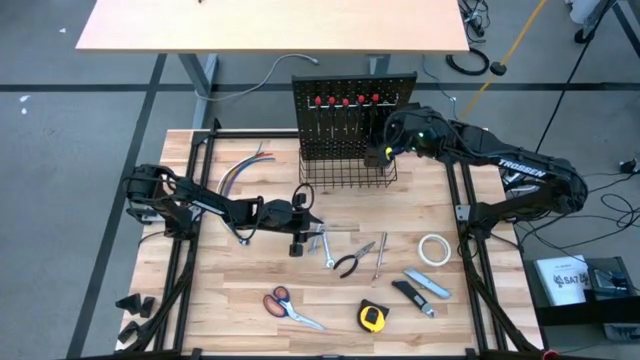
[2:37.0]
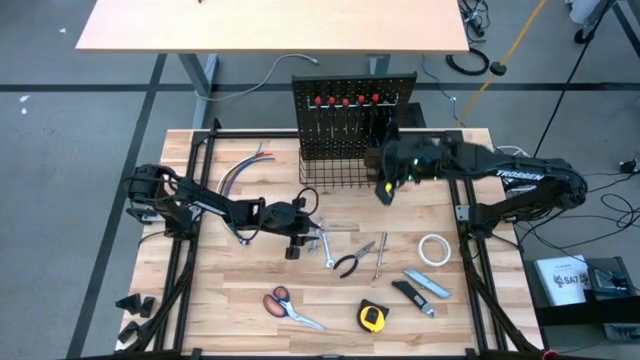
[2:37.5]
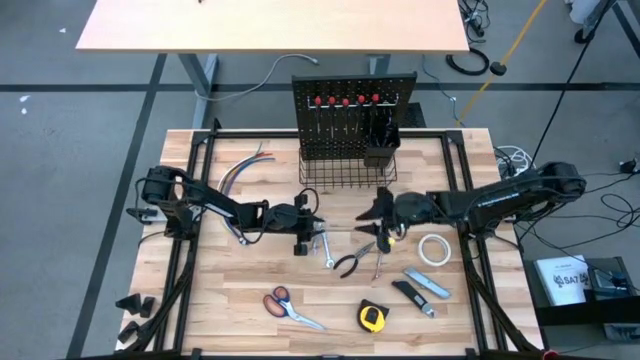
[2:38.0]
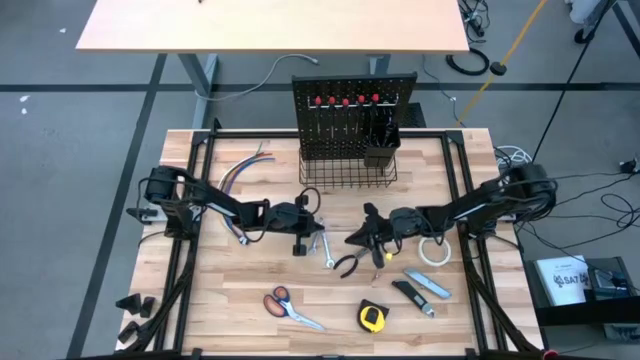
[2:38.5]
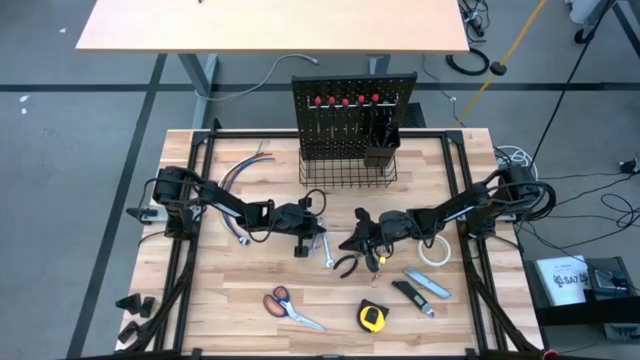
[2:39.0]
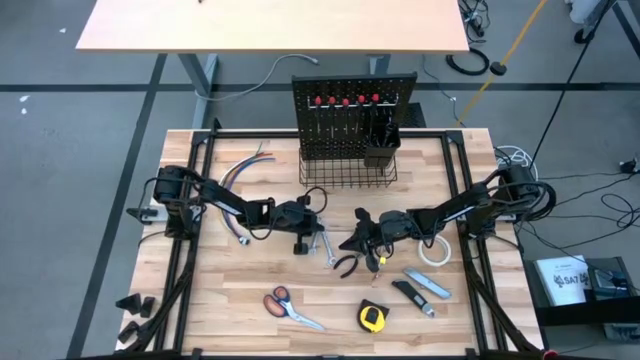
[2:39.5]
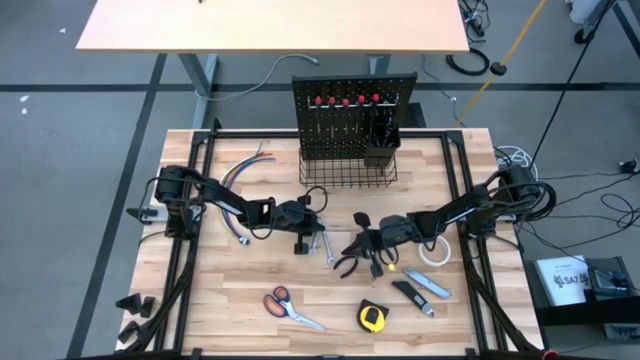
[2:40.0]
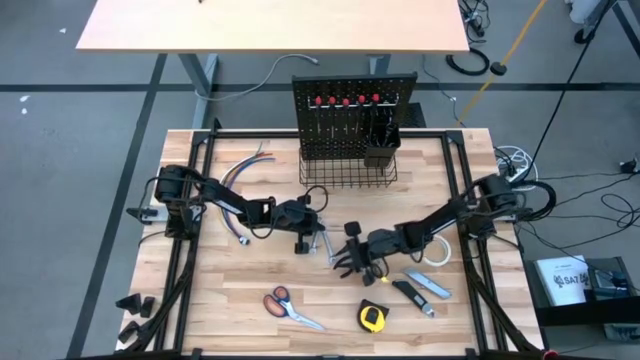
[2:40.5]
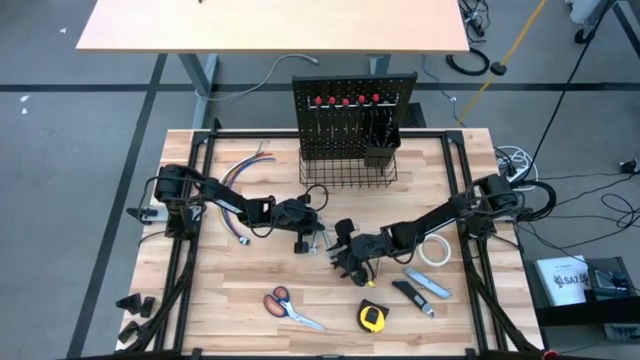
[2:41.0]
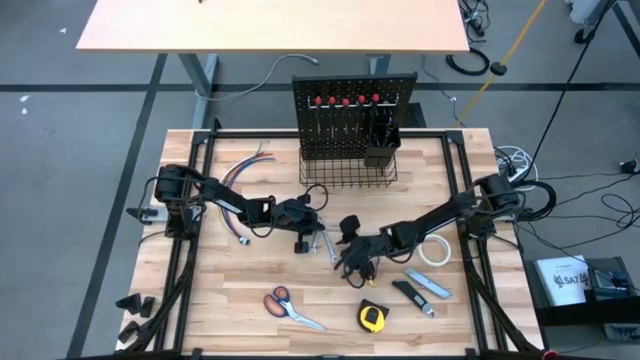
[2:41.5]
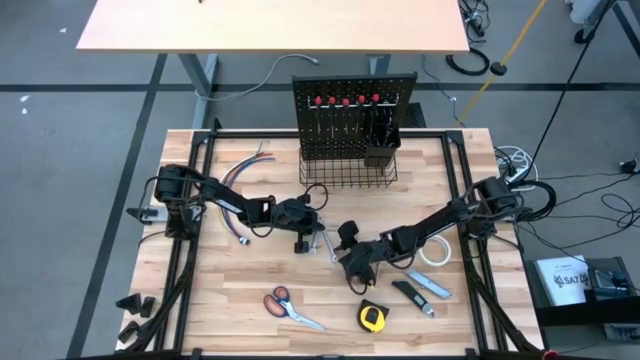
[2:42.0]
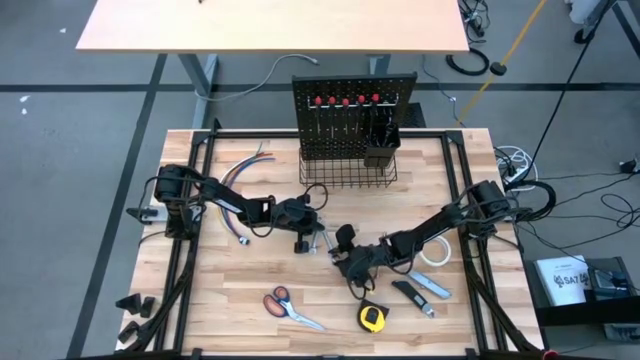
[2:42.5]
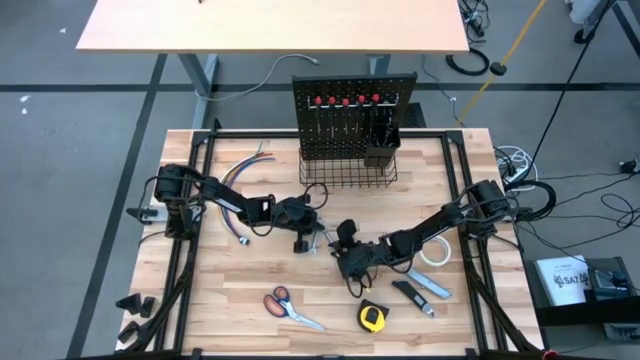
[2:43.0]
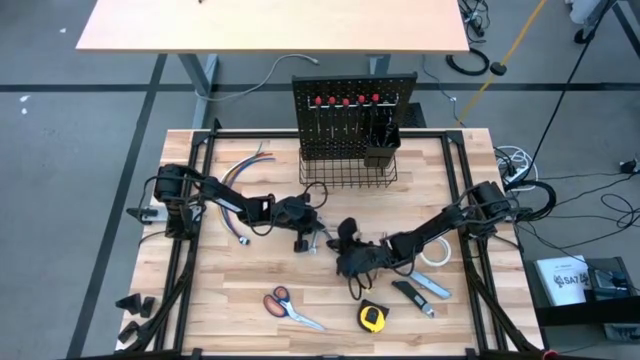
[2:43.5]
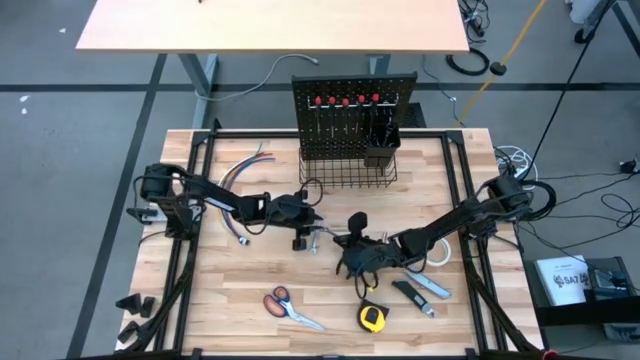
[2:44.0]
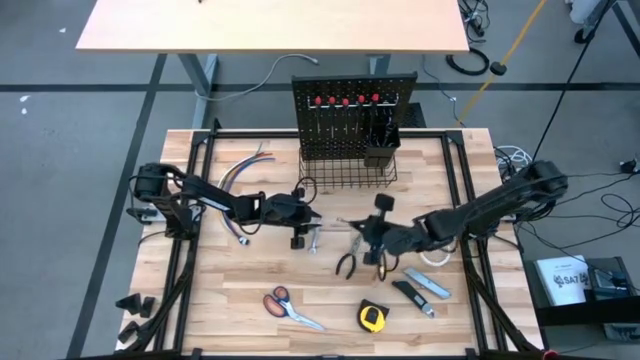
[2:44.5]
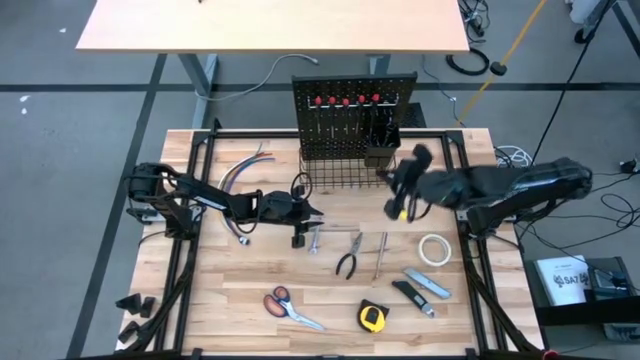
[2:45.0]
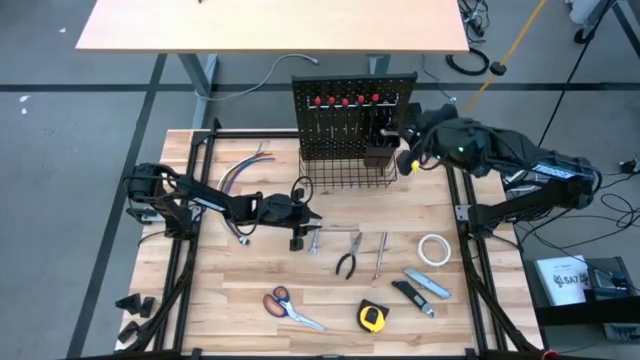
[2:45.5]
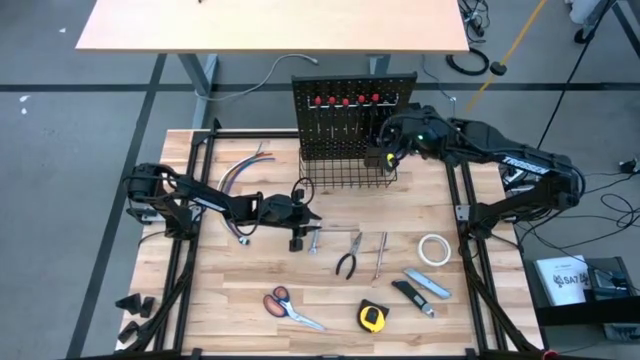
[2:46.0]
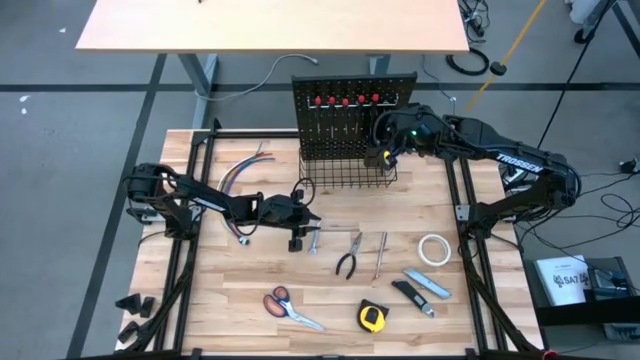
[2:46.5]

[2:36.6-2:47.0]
Task: Hang tools onto peg board
Put the wrench into the black bin on the pegboard

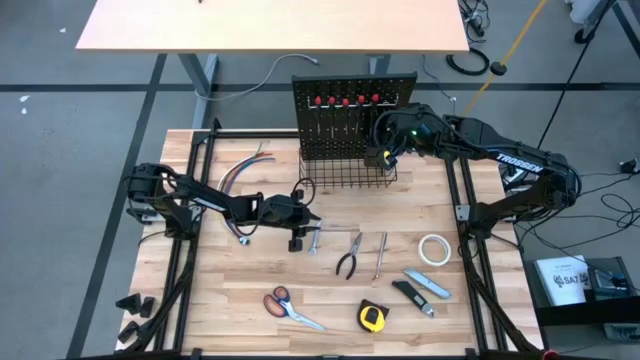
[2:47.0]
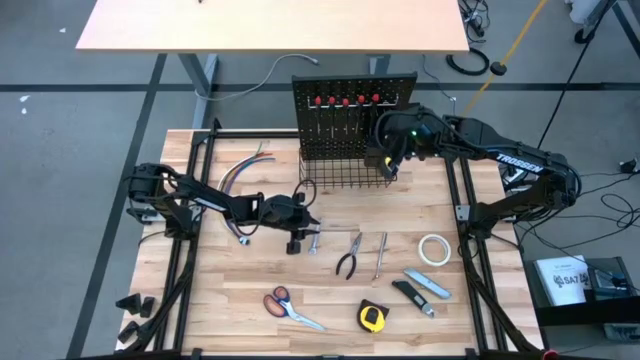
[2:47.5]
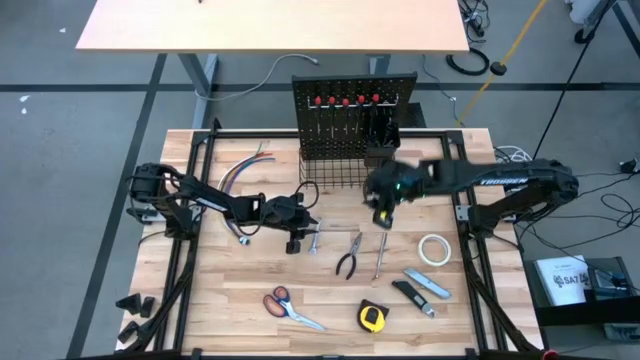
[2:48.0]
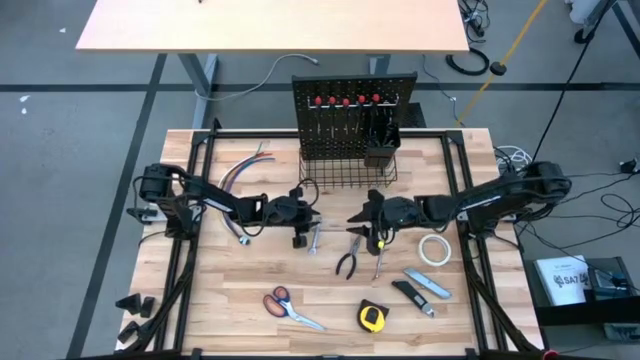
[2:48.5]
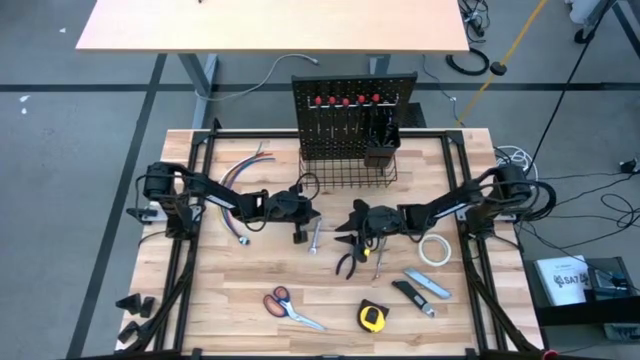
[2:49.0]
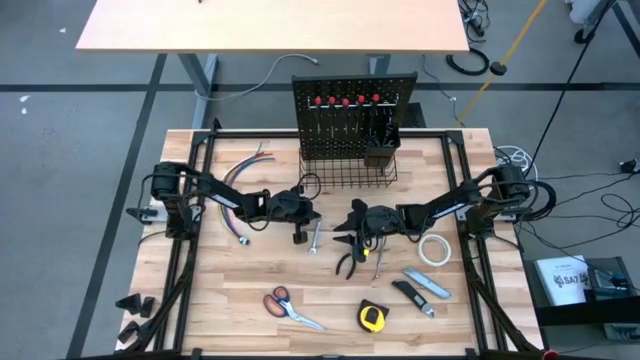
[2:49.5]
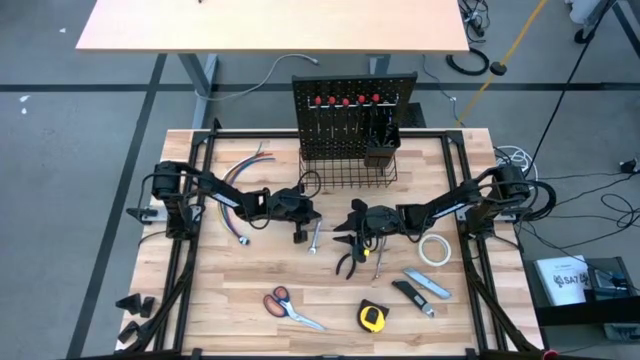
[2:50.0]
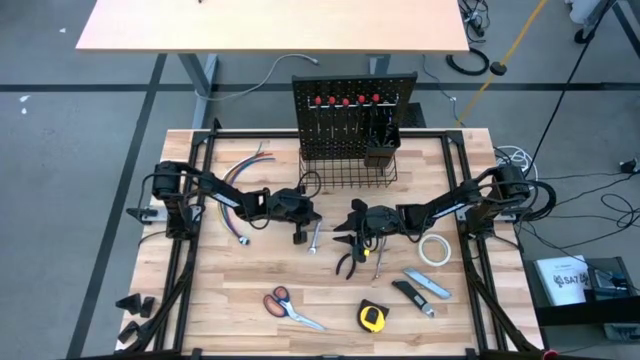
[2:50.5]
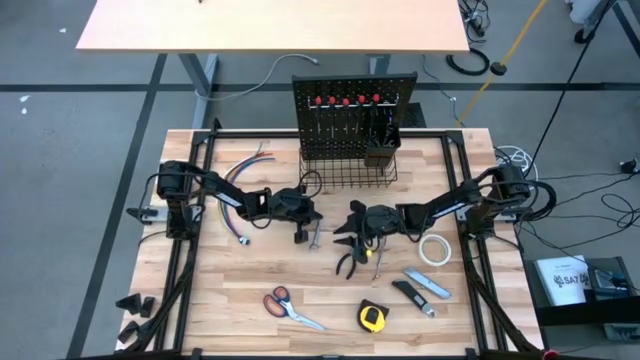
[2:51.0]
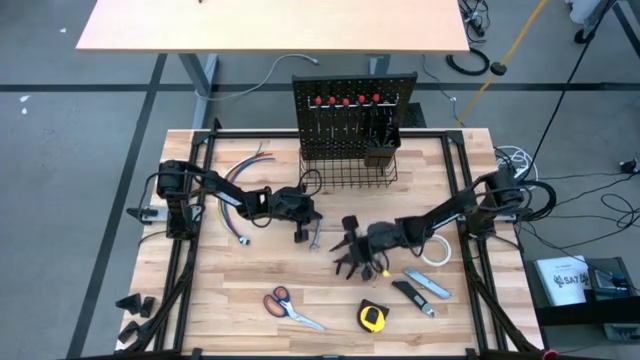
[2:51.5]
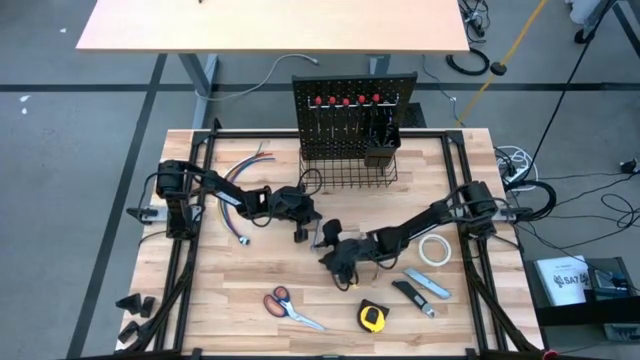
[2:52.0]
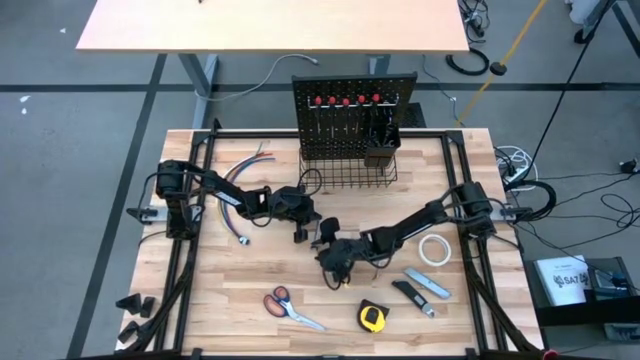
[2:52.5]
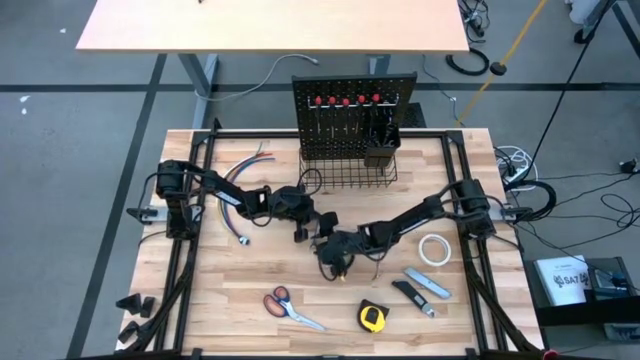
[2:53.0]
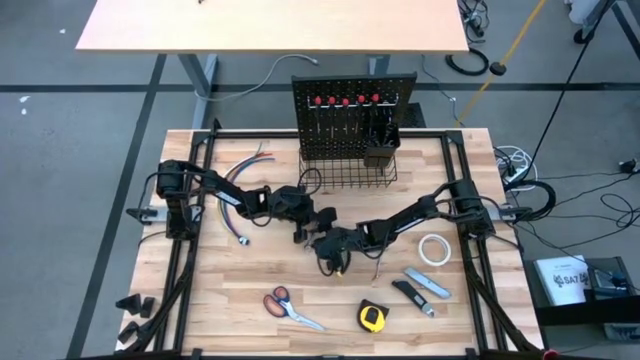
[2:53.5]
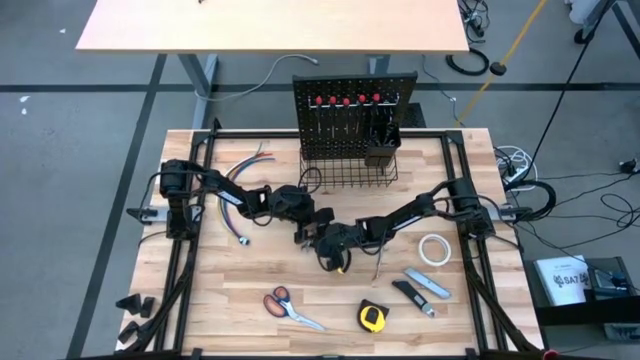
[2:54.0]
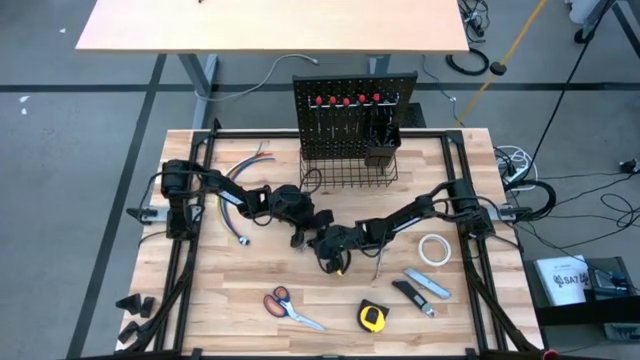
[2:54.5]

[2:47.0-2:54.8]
Put the wrench into the black bin on the pegboard

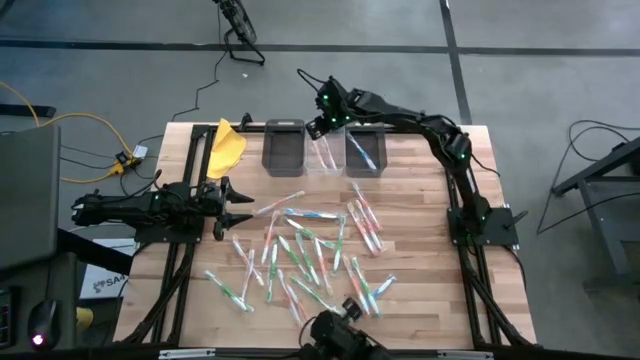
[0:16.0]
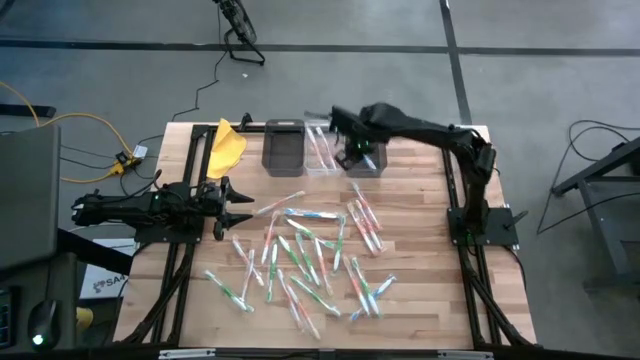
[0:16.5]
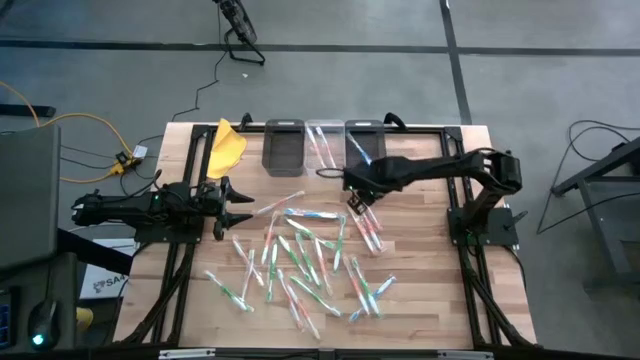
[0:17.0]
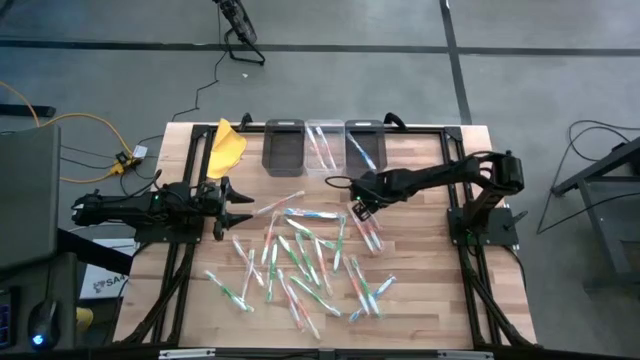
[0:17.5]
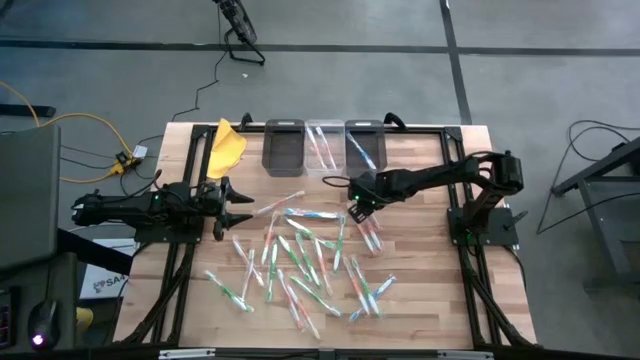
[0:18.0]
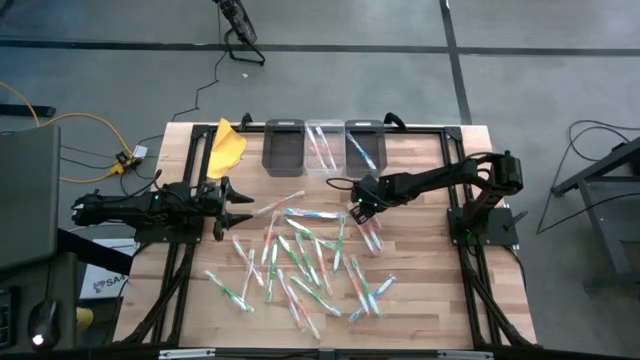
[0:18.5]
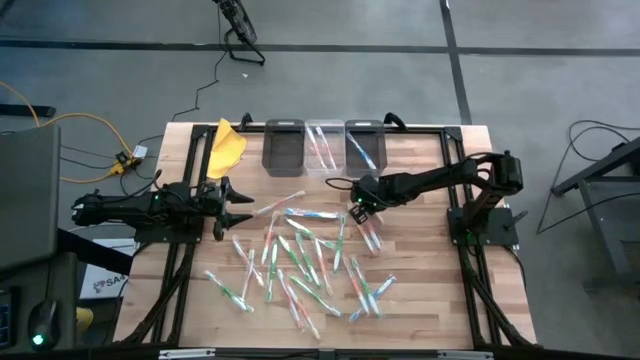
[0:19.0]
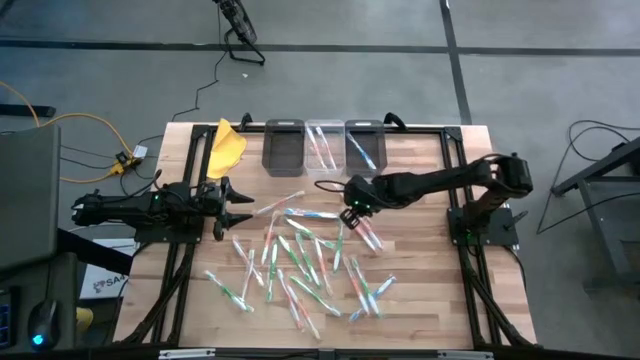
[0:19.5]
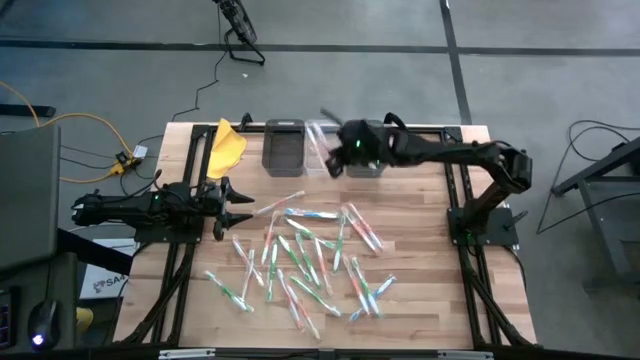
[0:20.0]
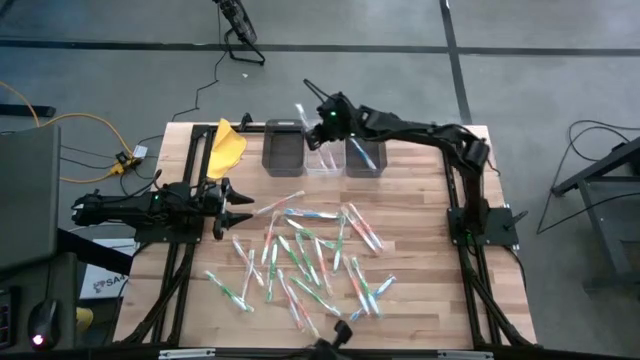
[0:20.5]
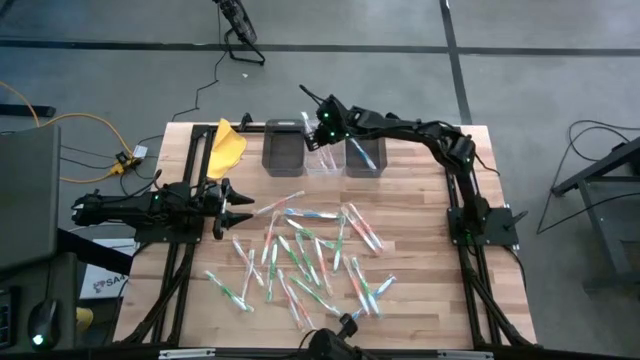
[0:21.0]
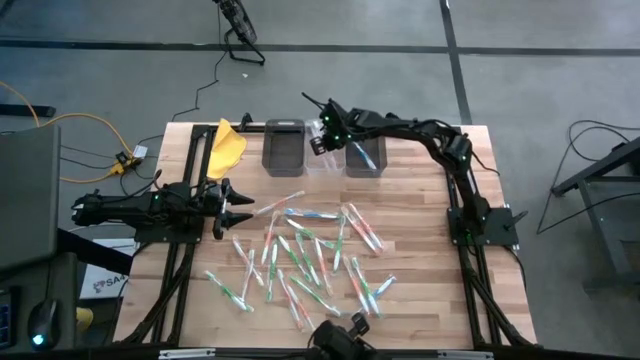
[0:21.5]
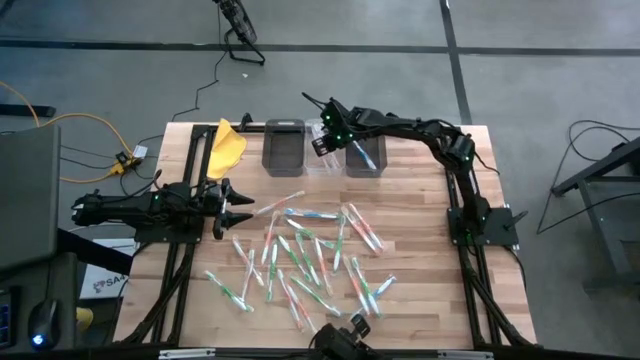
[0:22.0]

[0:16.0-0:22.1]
Task: Pick & Place Toothbrushes
Put the orange toothbrush into the transparent bin
